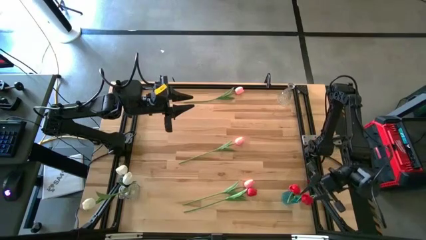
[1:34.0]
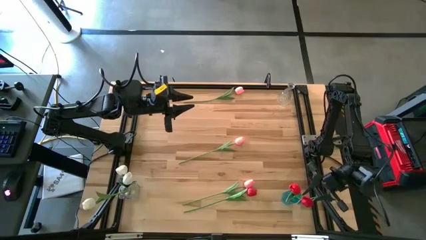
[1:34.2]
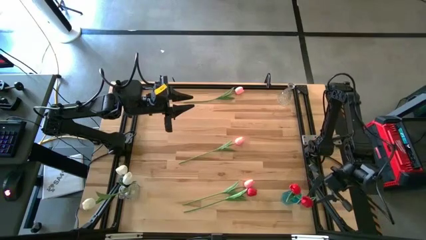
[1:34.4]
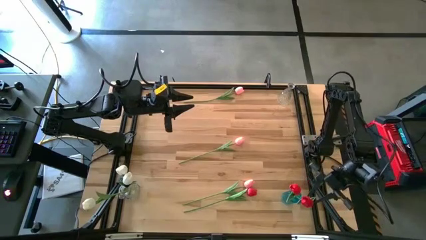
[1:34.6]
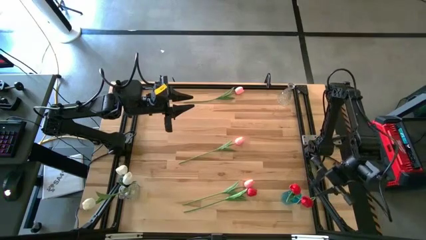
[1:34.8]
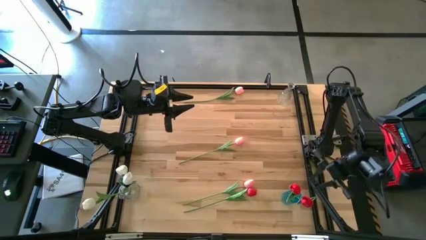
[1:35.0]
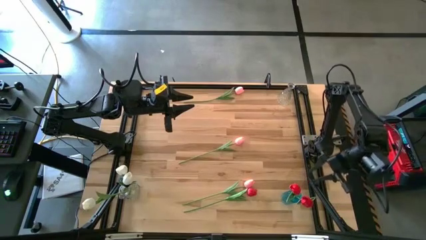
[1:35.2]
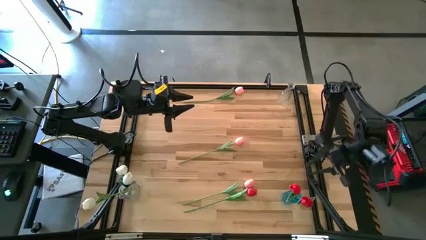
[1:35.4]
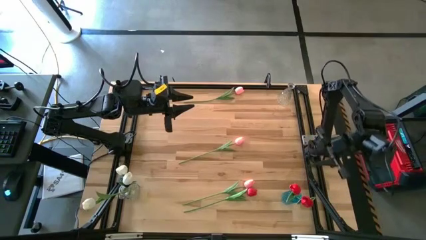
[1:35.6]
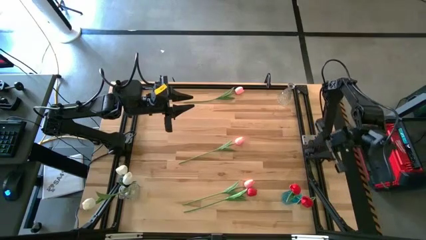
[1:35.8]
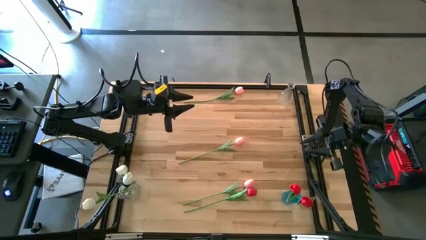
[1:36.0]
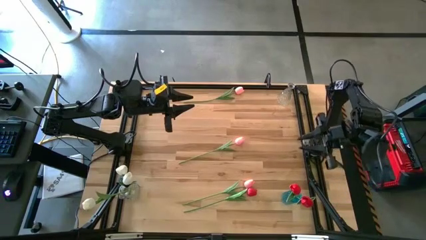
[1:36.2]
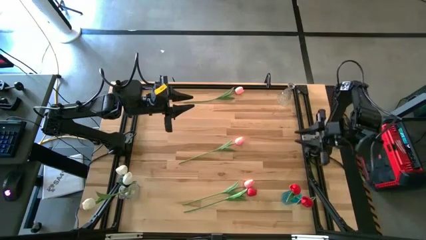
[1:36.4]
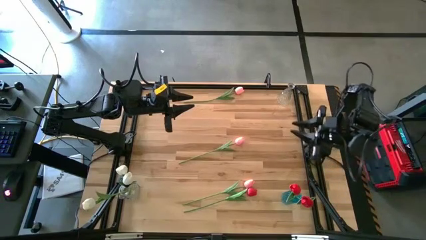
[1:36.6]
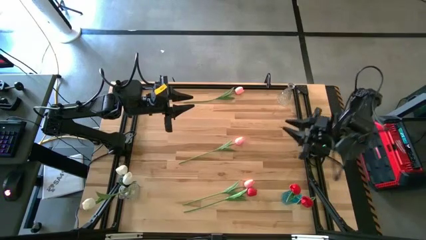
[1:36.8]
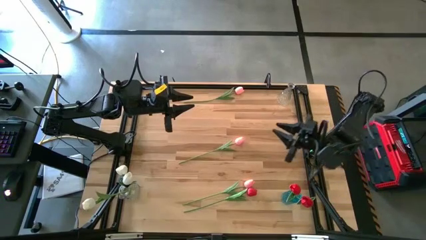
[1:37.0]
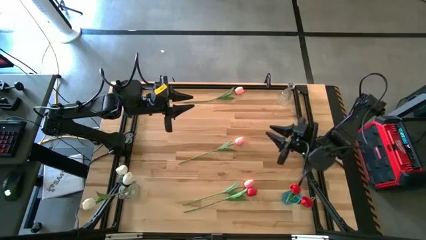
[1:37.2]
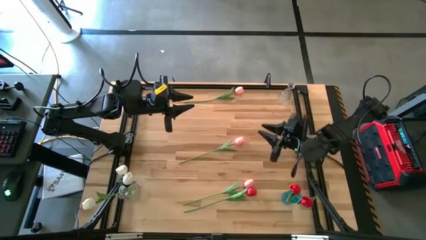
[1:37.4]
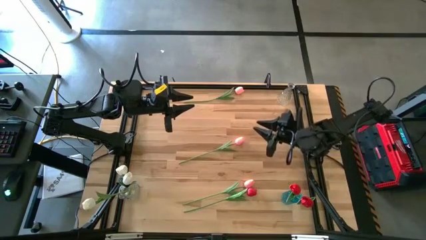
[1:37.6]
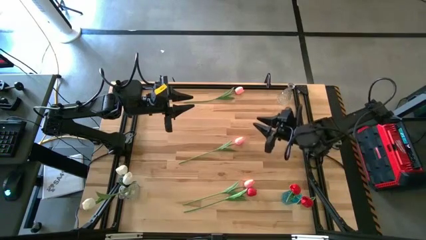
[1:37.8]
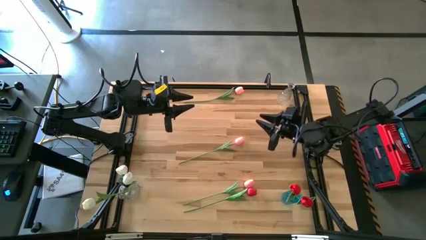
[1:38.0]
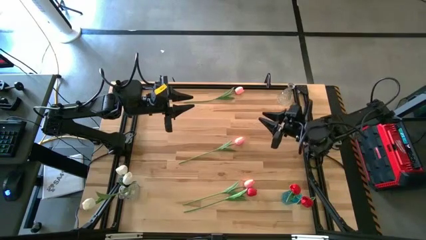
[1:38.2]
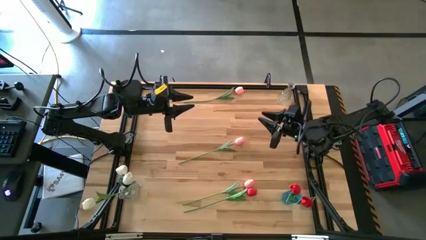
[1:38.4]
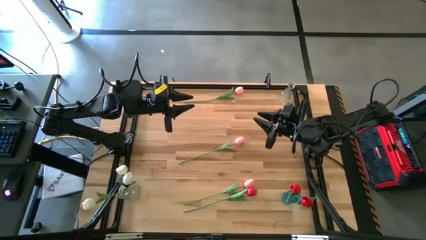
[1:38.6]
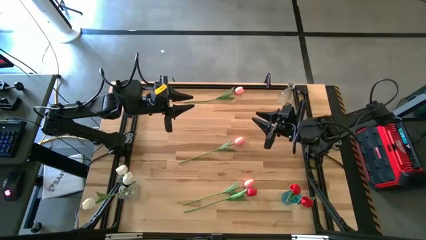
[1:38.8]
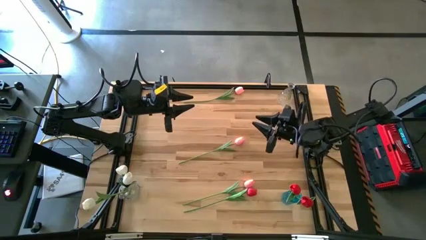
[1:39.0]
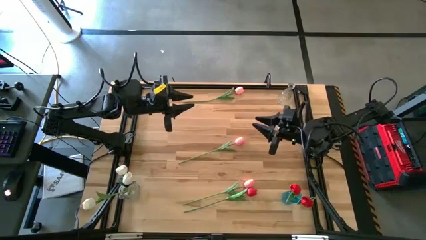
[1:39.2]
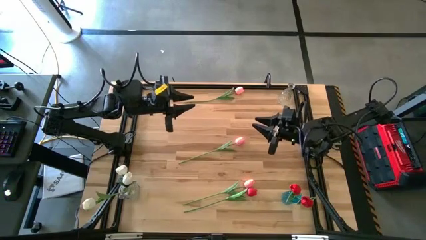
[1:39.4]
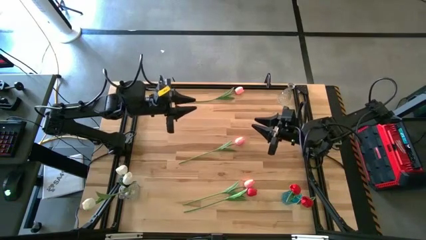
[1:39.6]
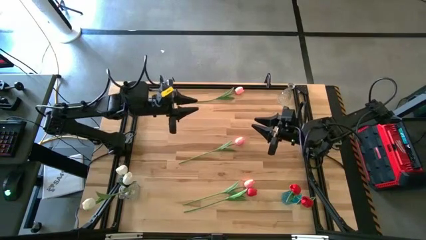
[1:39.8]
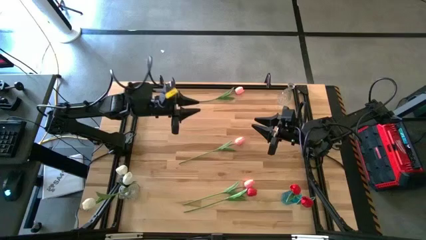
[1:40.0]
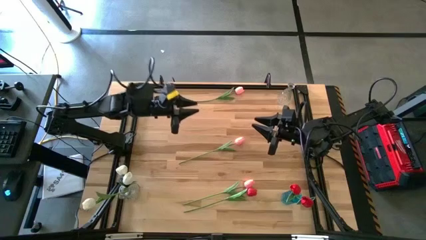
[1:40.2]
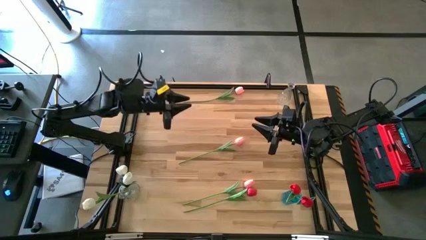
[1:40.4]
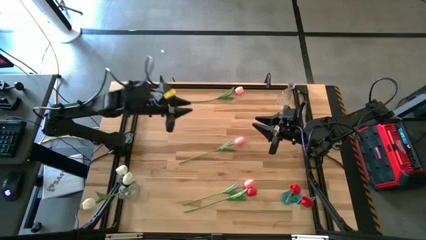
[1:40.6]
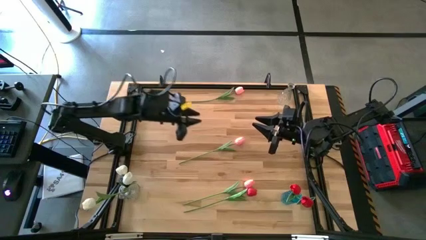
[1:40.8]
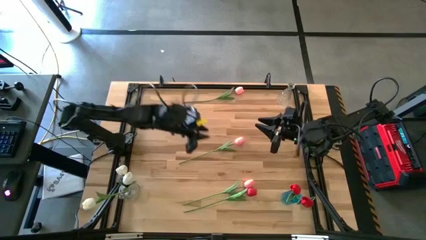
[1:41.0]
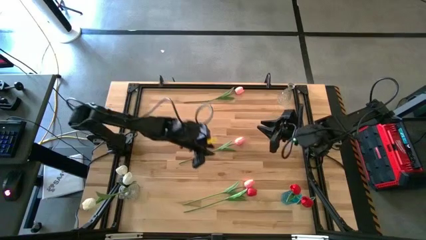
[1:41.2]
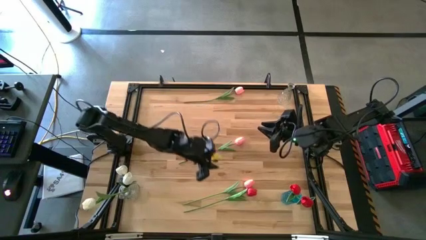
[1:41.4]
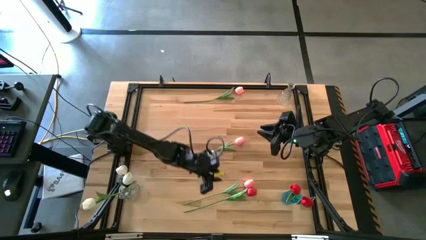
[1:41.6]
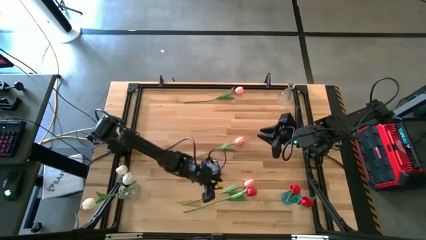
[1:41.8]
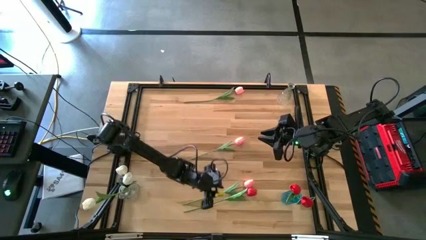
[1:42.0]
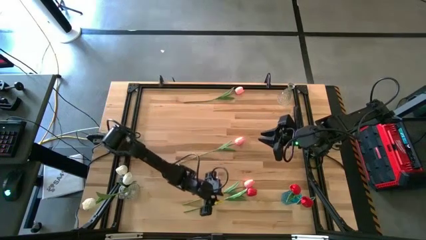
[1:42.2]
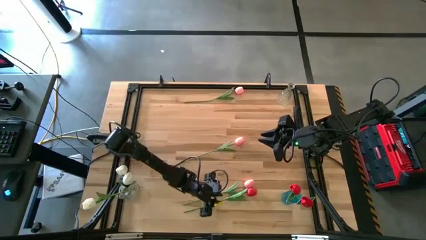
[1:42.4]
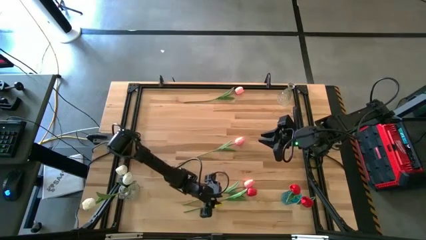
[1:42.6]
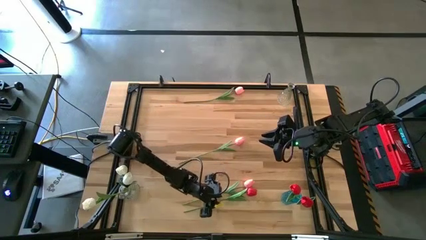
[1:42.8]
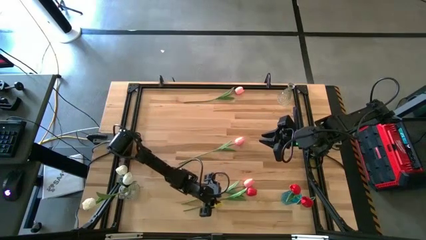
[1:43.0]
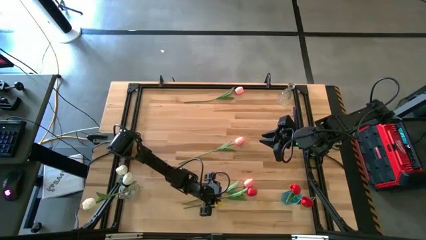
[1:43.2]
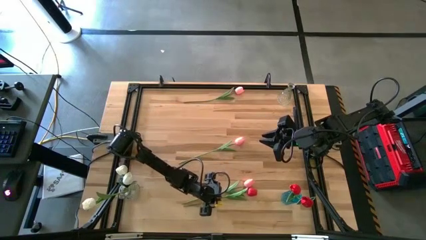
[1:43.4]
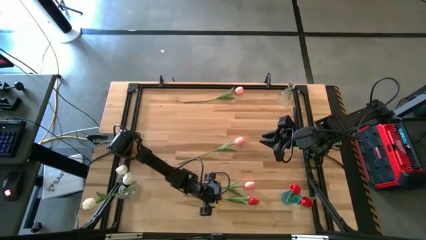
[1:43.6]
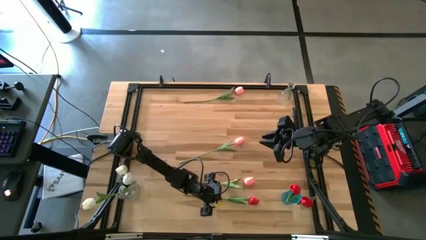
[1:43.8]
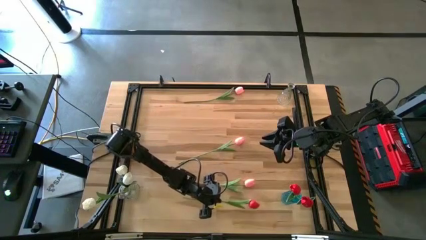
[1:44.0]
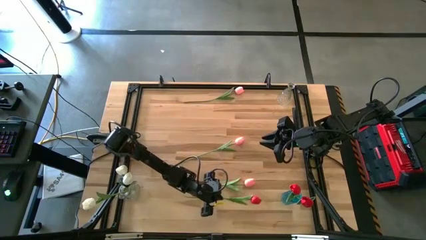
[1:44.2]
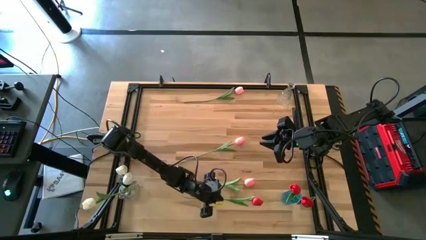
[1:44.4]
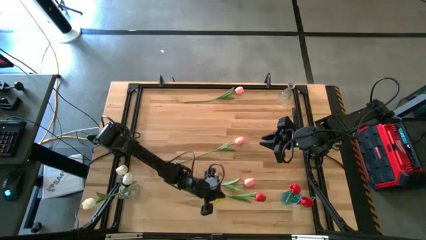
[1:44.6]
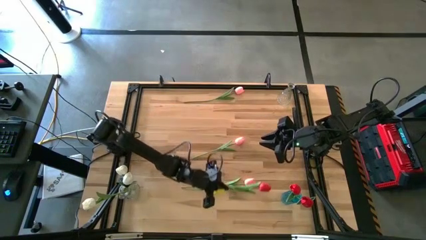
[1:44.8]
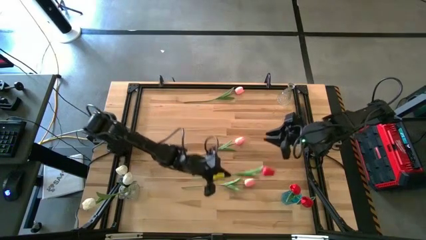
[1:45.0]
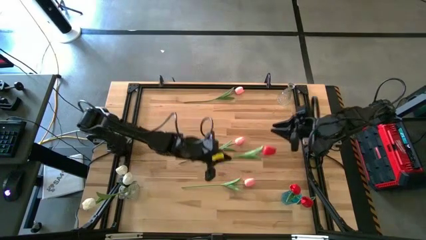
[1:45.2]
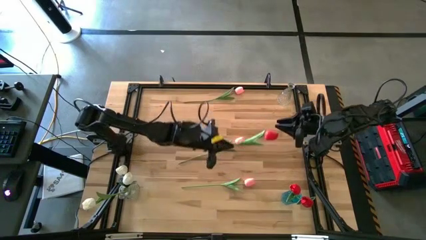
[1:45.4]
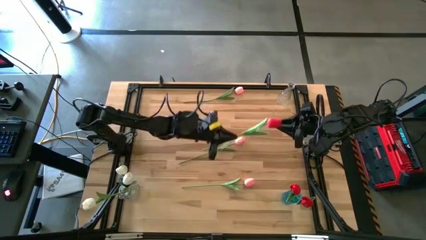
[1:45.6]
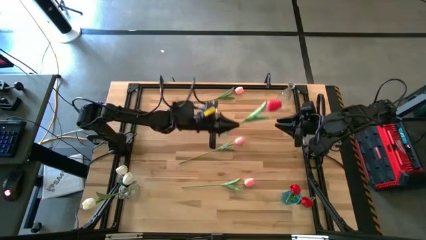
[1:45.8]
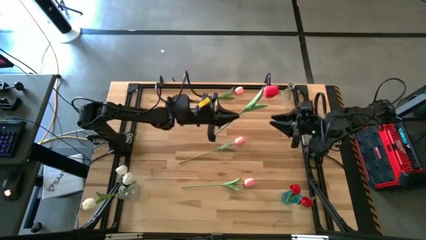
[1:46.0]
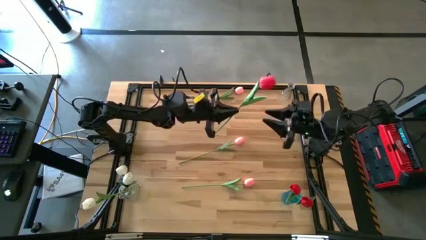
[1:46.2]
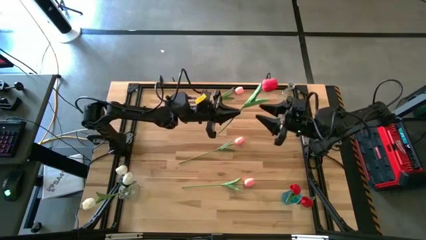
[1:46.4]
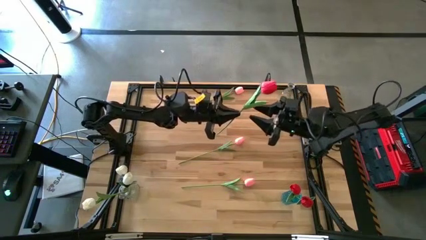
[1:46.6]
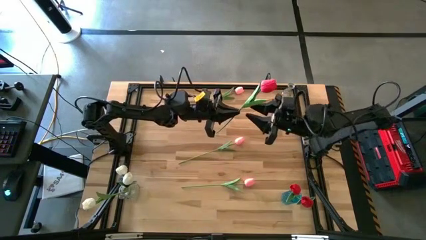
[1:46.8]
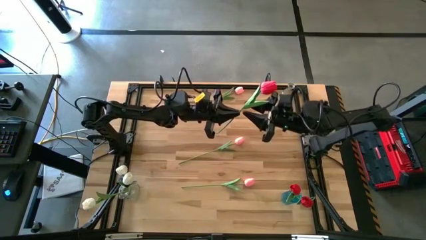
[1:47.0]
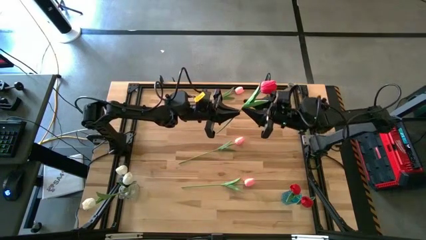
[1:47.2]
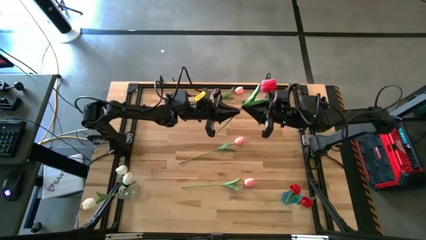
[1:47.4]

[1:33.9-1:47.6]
Task: Sort flowers into vase by color
Put the red flower into the blue vase

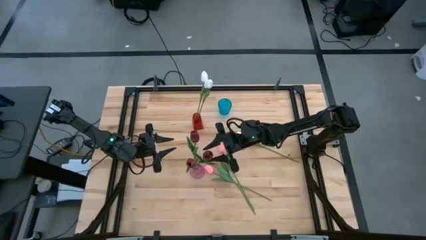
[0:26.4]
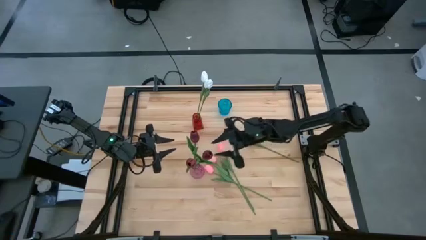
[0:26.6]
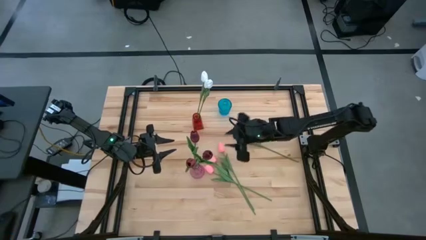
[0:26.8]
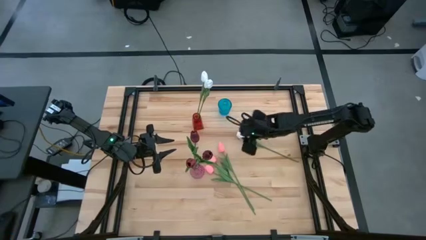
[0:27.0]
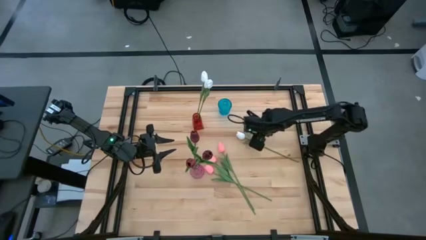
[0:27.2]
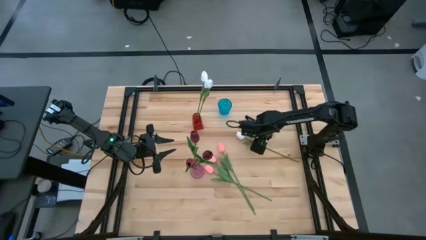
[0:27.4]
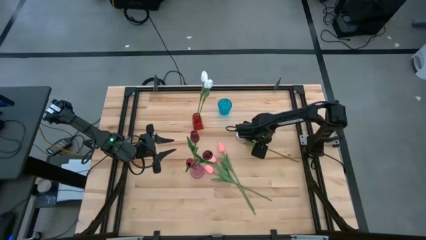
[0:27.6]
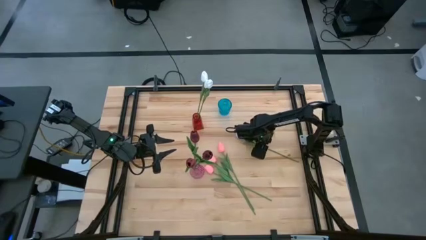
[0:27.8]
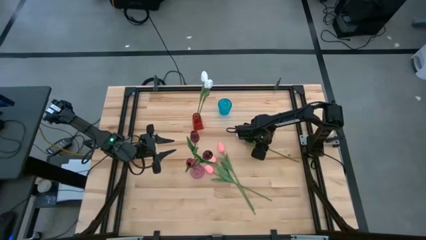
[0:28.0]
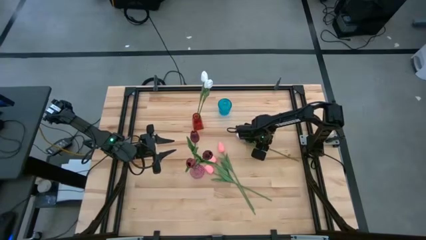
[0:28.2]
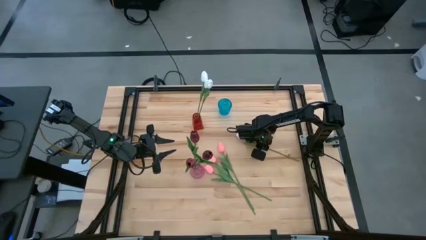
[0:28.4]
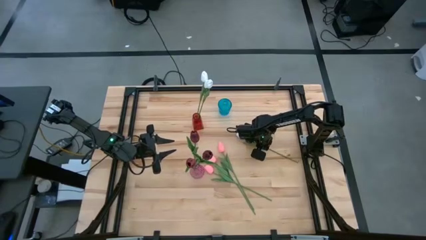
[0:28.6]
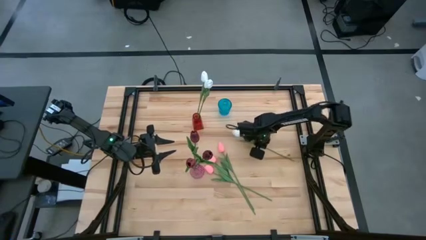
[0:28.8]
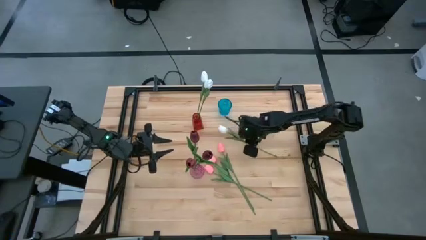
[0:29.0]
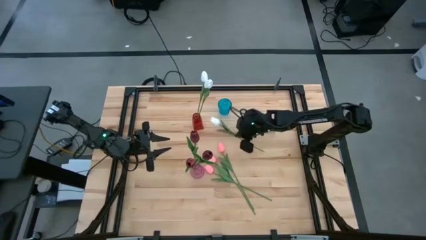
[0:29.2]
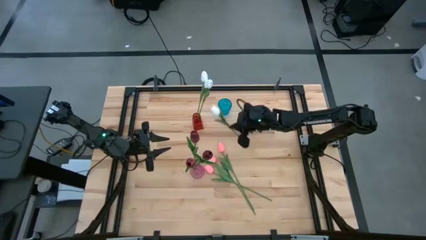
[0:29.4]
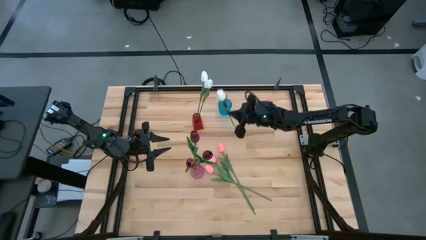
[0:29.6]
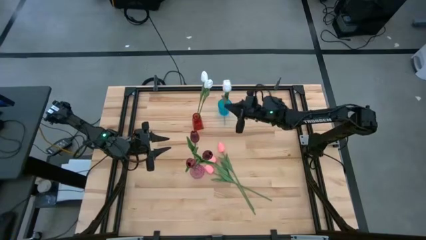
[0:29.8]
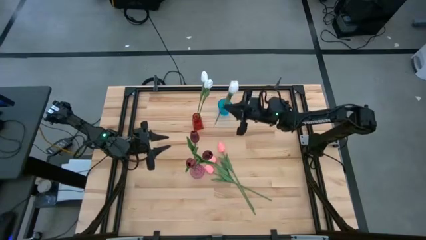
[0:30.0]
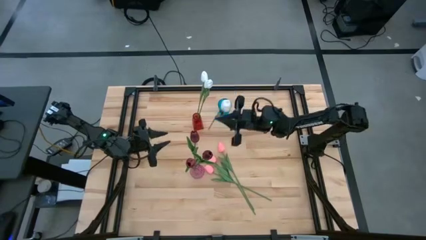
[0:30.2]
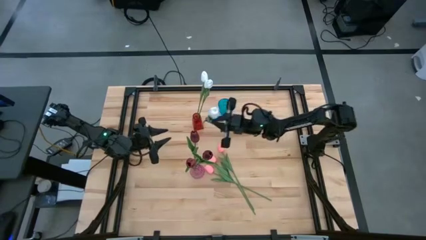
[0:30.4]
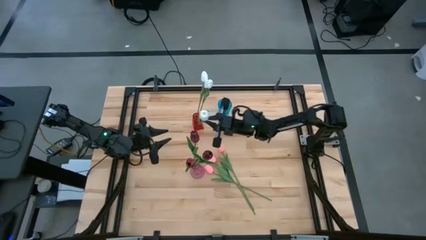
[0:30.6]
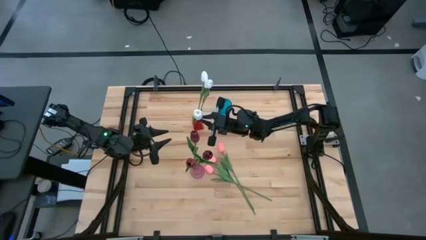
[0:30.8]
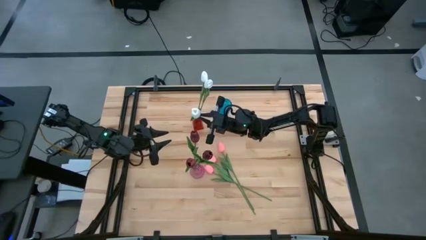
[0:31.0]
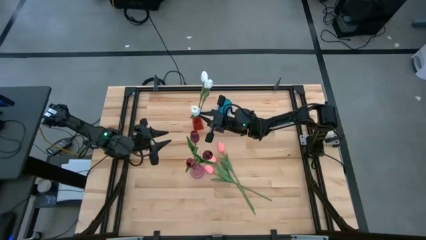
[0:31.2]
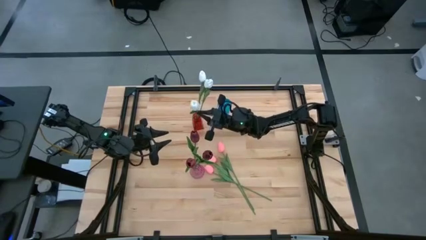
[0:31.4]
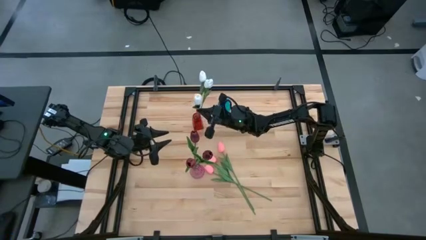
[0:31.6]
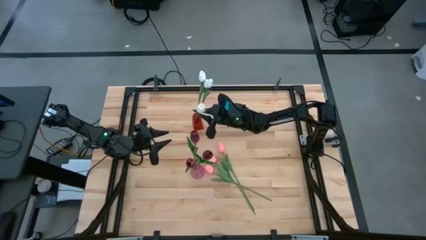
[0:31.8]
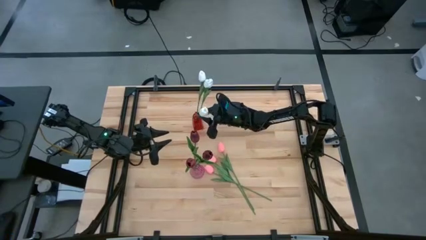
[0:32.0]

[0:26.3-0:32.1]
Task: Sort flowers into vase by color
Put the white tulip into the red flower vase
